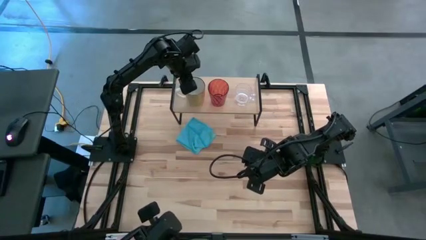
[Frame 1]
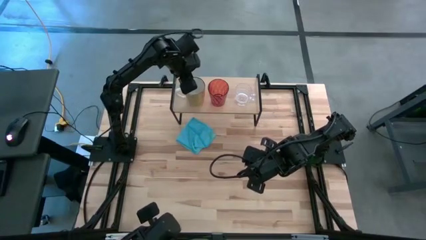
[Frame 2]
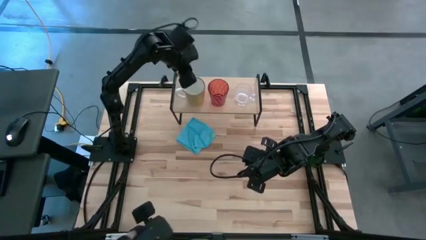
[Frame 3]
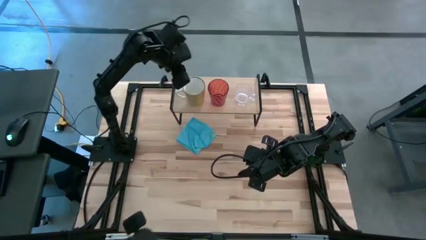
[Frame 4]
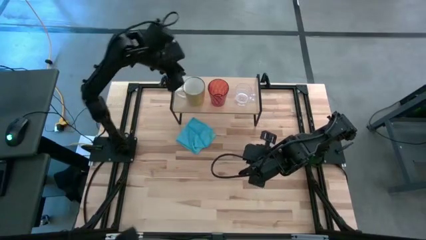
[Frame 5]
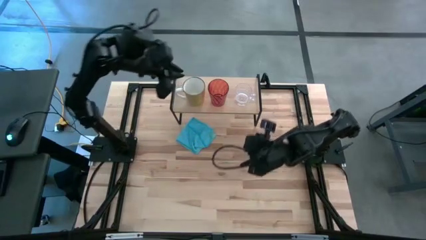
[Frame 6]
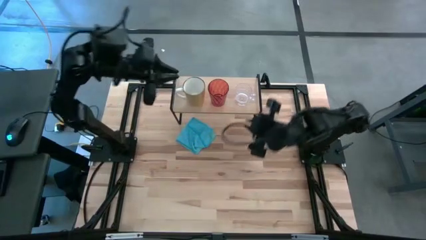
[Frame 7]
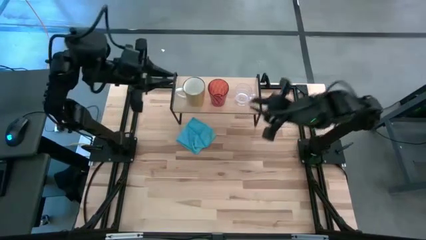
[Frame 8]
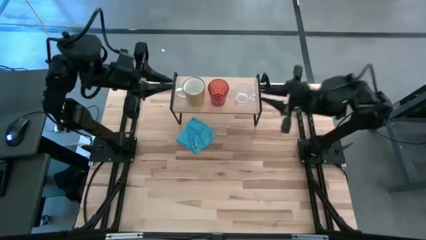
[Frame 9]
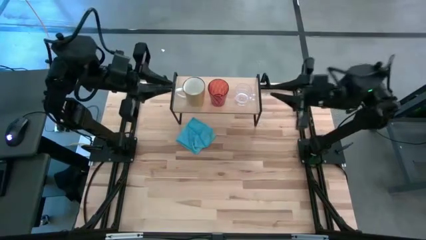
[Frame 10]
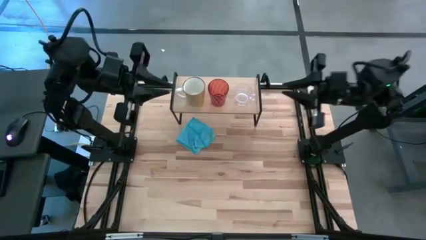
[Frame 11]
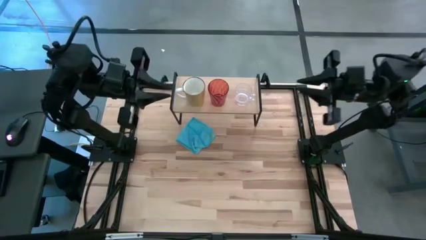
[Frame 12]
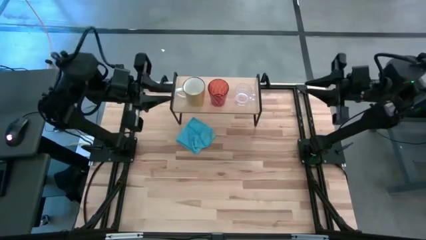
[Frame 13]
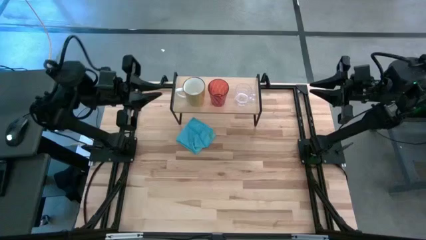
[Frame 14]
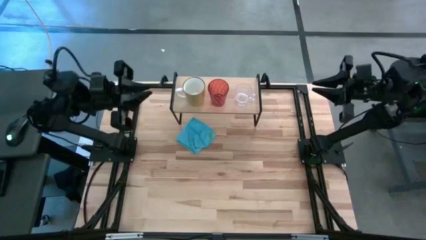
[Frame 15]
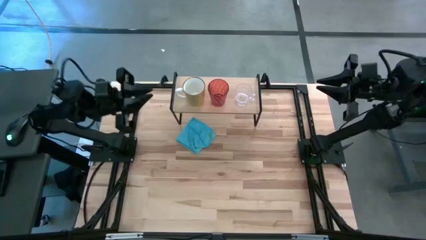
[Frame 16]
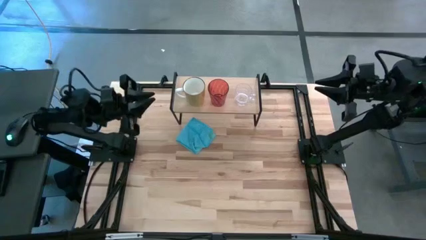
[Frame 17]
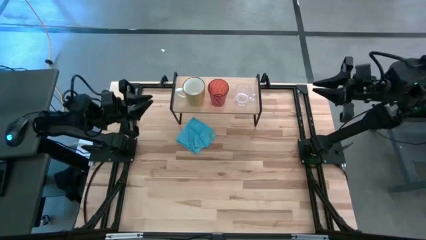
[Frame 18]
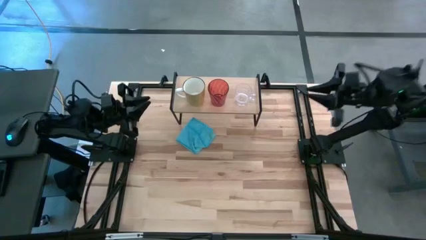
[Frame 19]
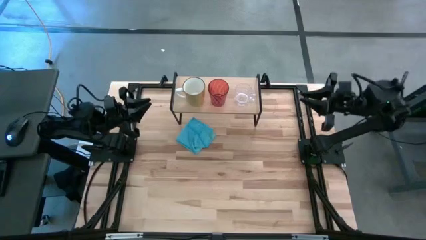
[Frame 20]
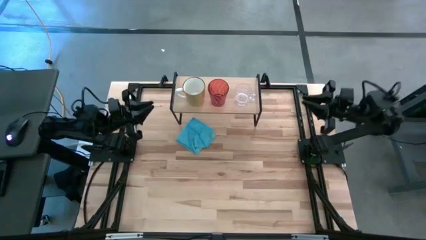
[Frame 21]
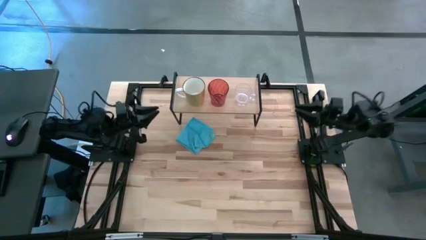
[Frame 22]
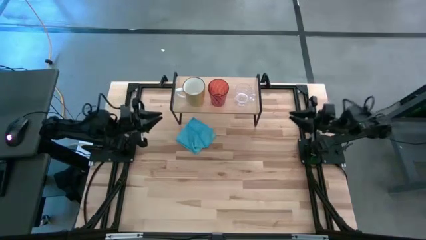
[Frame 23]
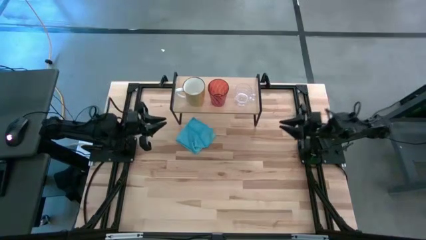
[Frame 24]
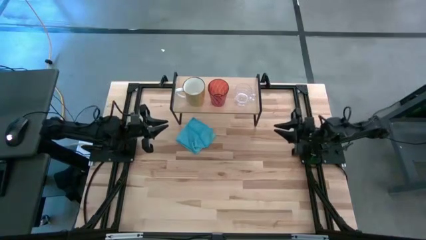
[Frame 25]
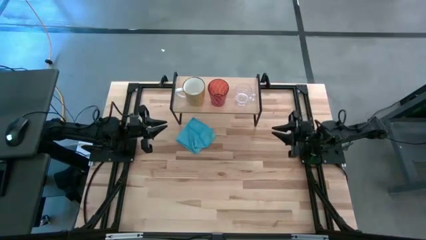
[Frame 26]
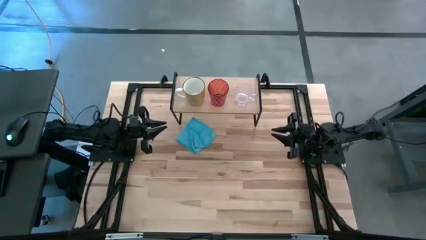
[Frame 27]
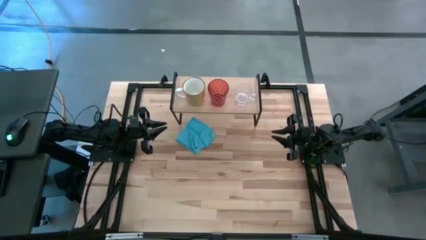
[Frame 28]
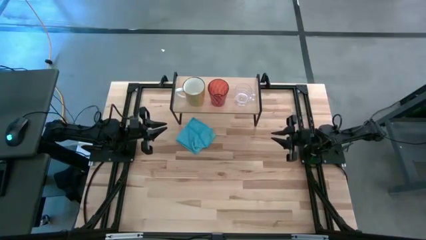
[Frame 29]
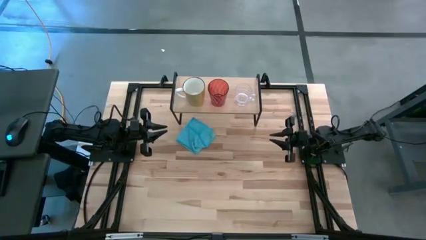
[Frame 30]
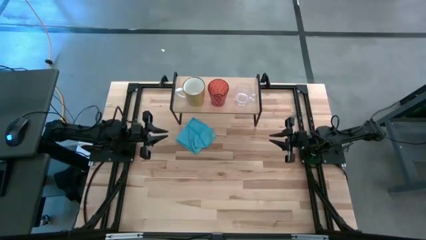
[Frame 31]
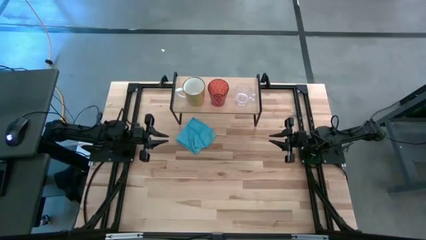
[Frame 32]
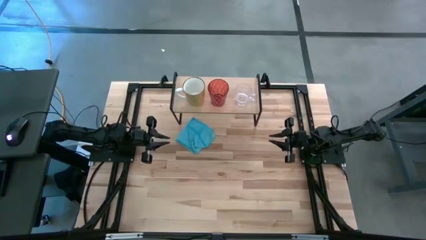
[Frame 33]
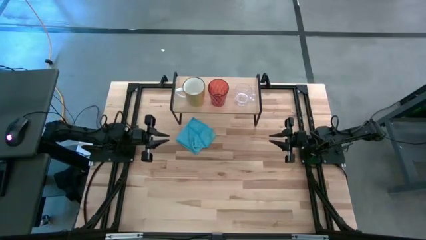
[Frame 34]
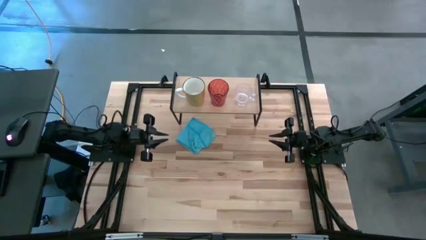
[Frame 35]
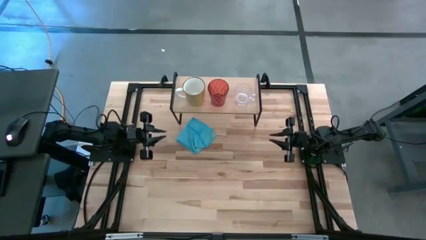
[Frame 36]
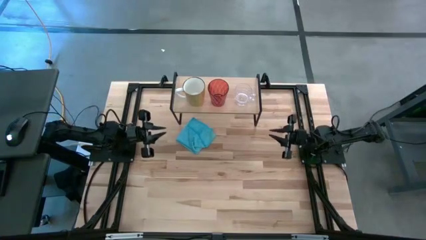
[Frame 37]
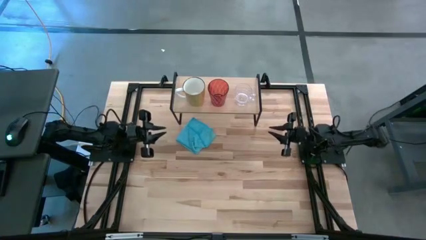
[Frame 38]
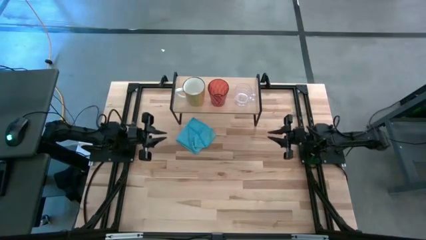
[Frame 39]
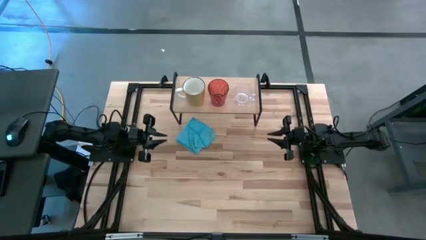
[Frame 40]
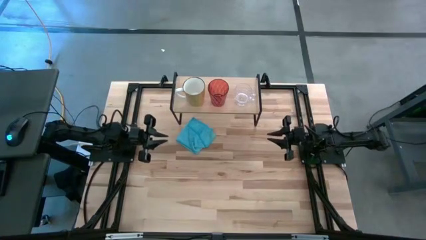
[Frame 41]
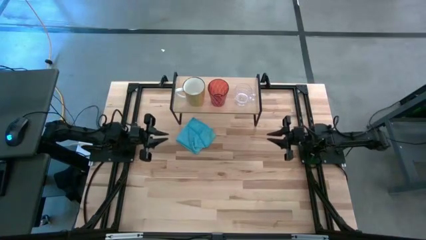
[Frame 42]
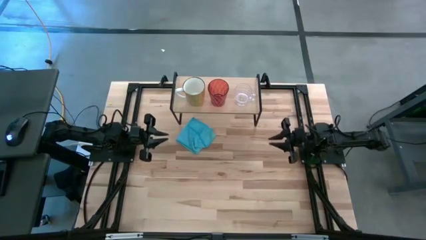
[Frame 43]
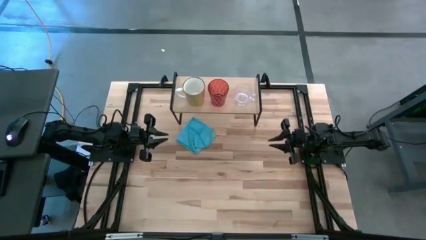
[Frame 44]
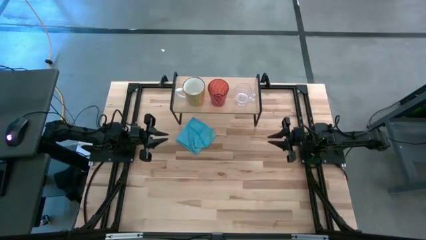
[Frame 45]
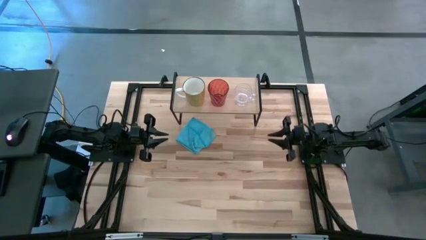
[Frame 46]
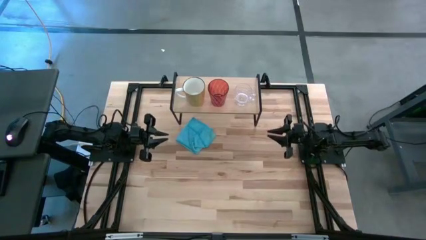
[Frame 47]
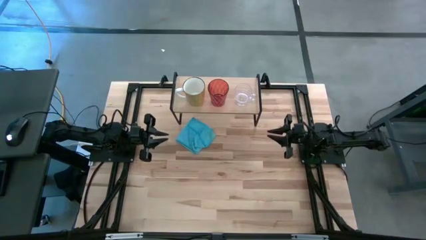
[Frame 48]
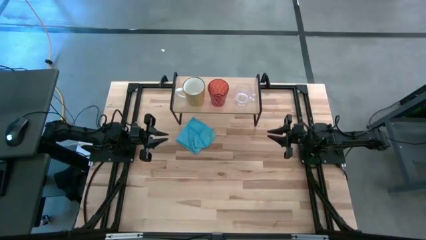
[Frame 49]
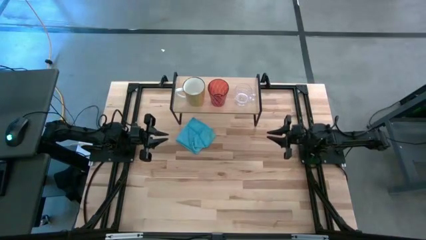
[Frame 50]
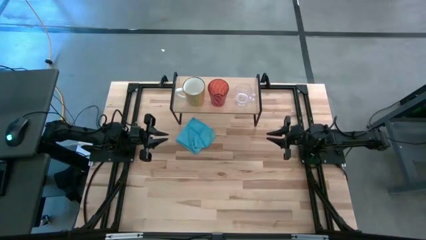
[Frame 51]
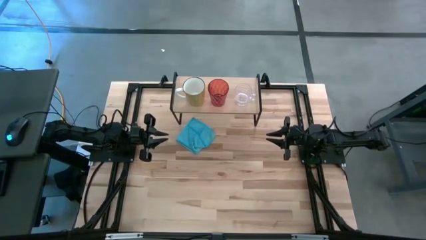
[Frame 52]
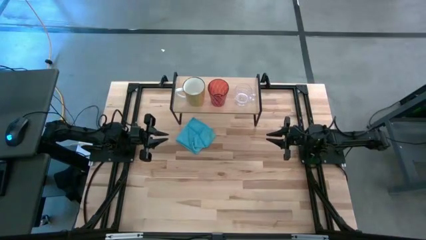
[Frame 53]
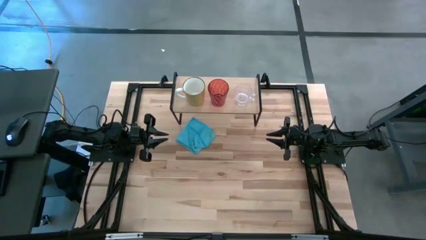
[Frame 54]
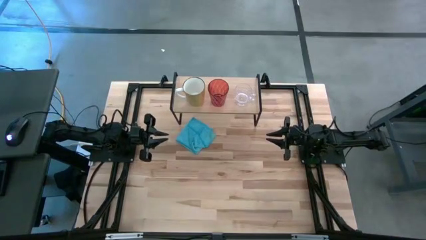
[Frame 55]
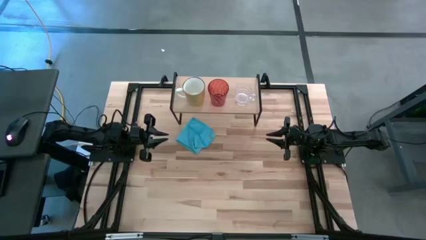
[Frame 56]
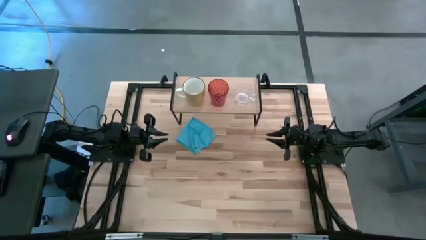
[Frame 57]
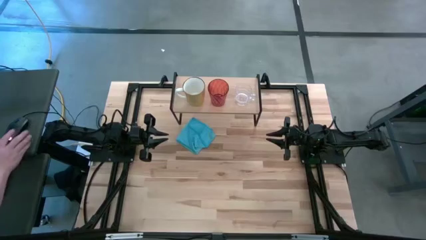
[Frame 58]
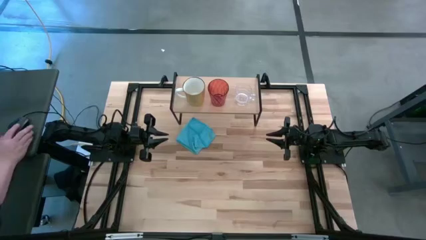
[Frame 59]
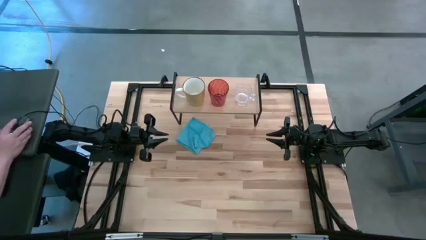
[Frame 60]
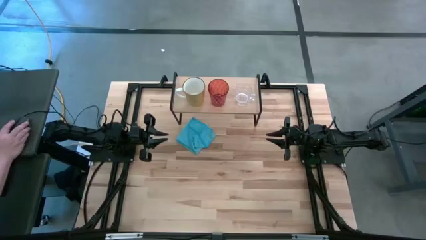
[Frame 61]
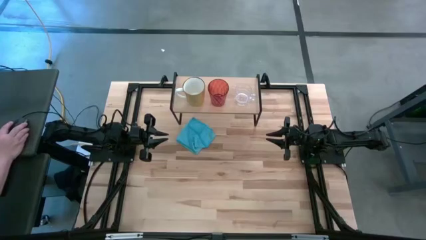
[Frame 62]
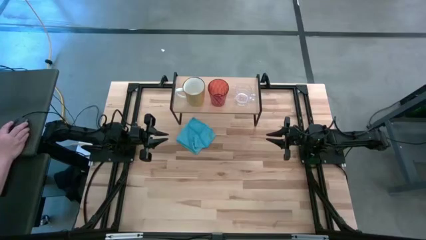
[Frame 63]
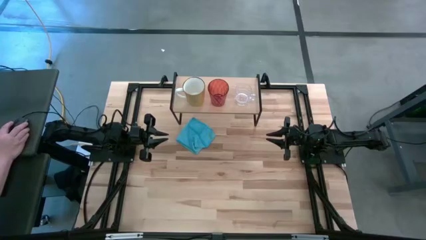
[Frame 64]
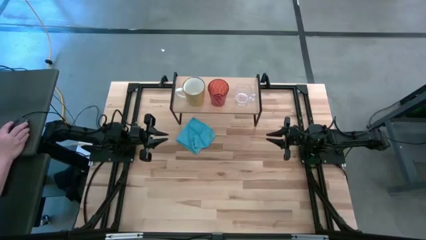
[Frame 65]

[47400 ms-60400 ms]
Task: Stack small to large cups/mugs on shelf
Return to Home Position

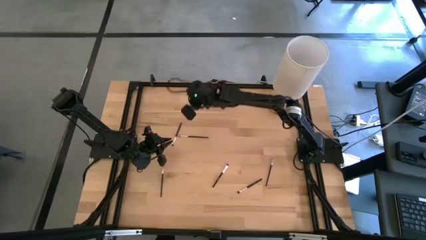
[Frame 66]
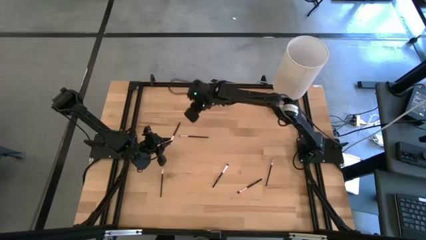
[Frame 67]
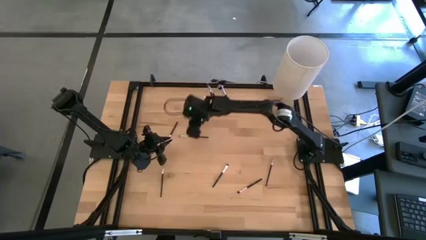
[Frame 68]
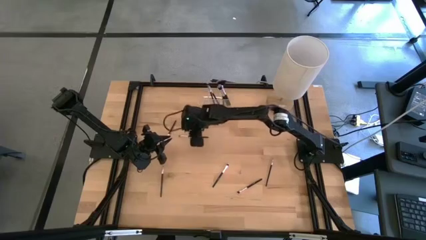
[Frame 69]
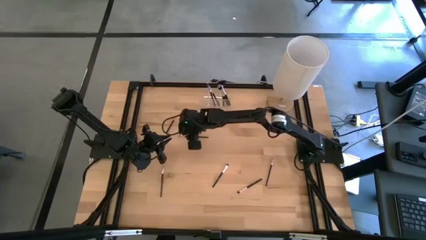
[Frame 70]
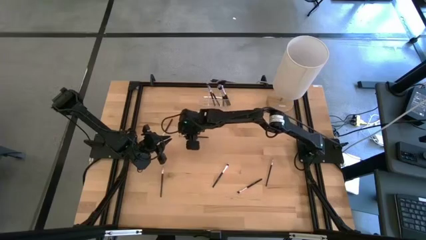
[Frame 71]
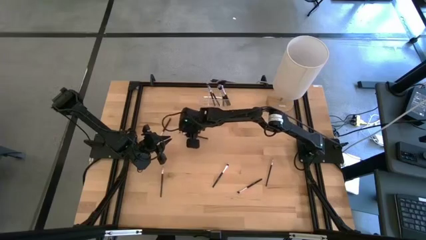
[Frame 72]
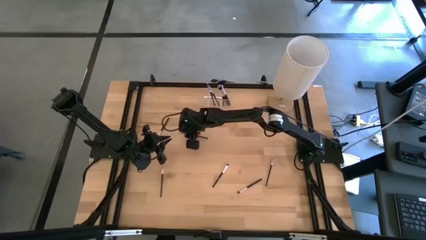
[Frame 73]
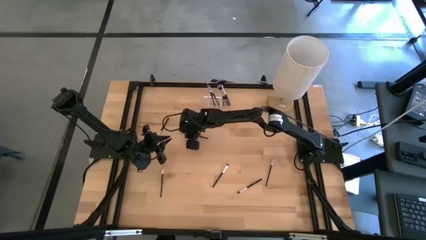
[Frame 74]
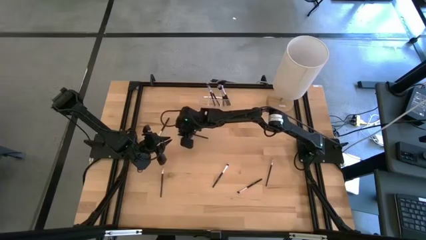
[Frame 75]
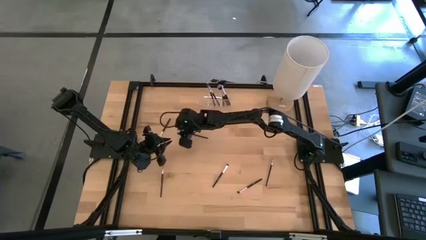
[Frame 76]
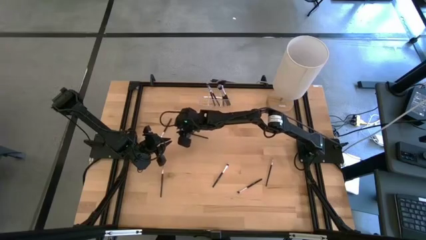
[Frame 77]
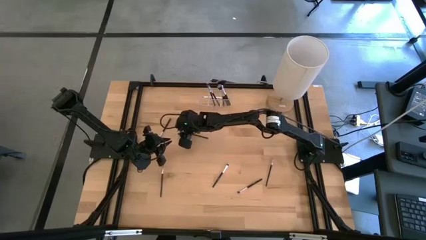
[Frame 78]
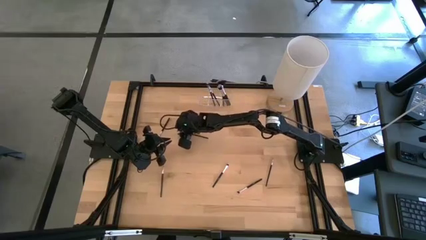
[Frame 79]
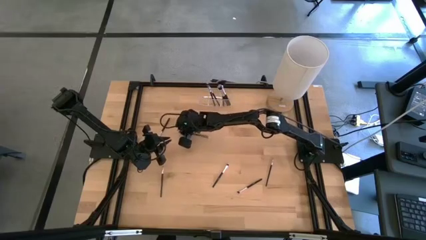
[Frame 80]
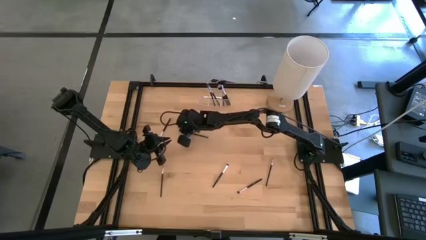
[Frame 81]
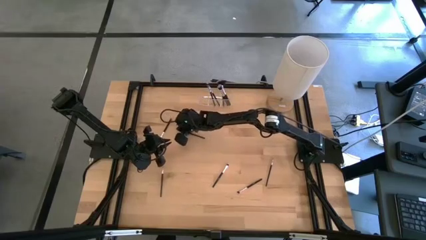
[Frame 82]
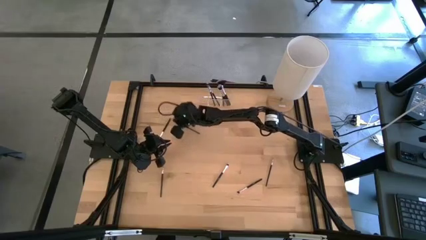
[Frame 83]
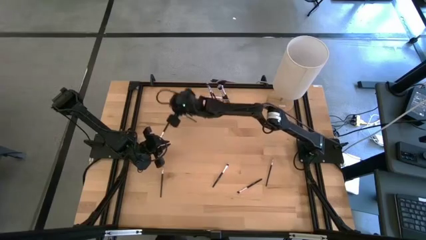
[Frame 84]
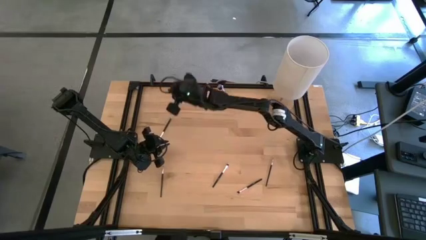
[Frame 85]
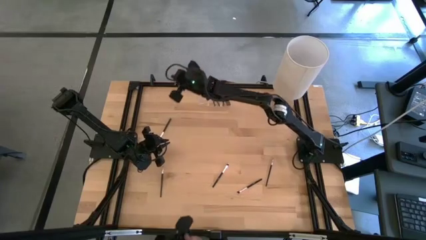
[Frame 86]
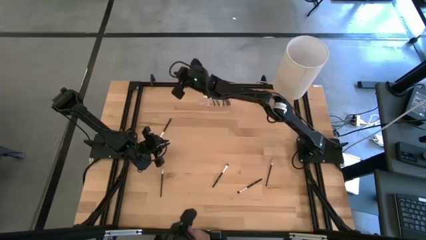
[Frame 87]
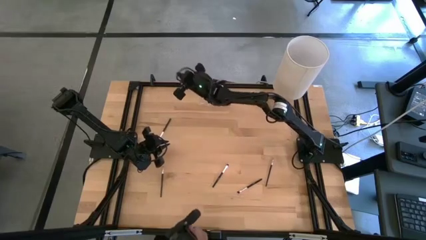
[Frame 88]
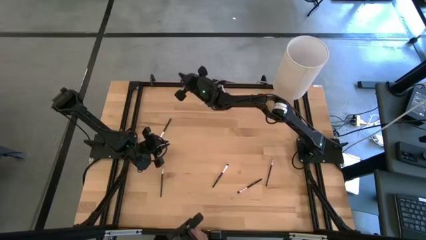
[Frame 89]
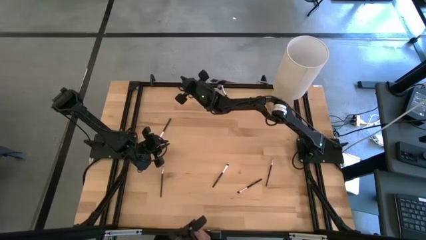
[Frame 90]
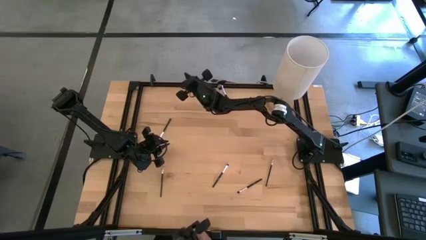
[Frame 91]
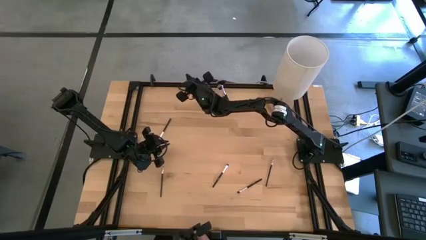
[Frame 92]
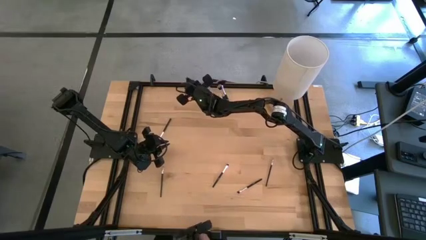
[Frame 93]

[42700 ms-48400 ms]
Task: Put items in baskets/containers
Put the black eyeshadow brush into the transparent organizer
